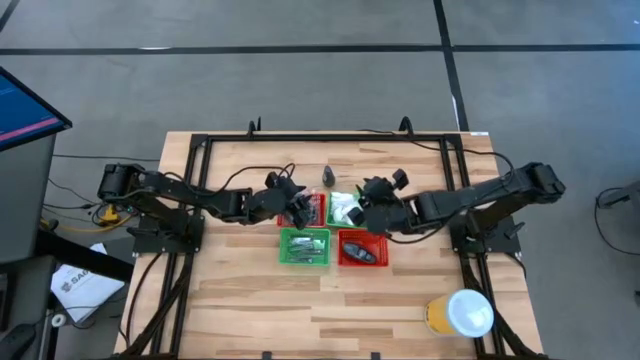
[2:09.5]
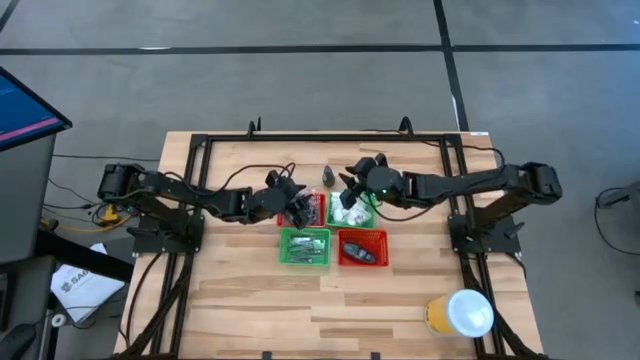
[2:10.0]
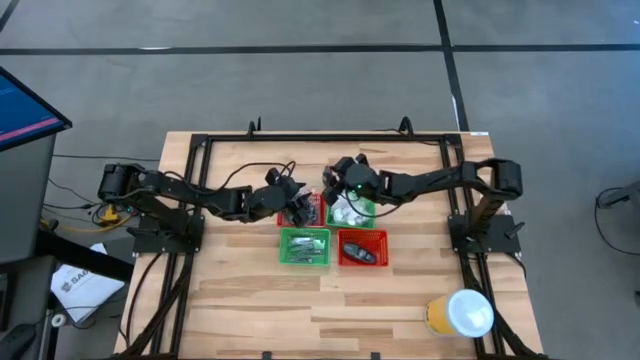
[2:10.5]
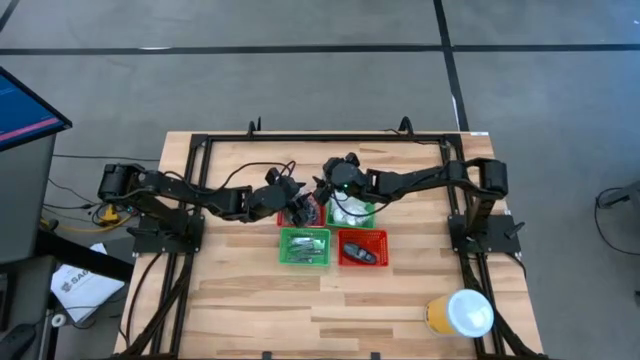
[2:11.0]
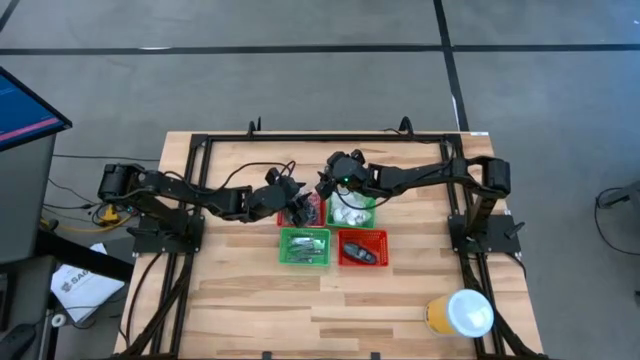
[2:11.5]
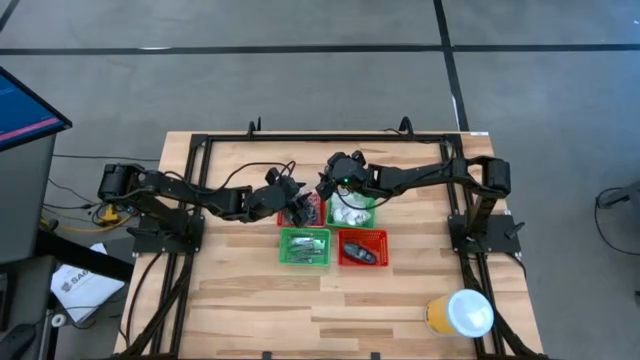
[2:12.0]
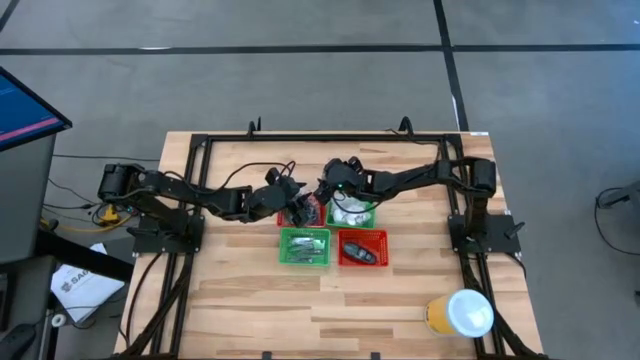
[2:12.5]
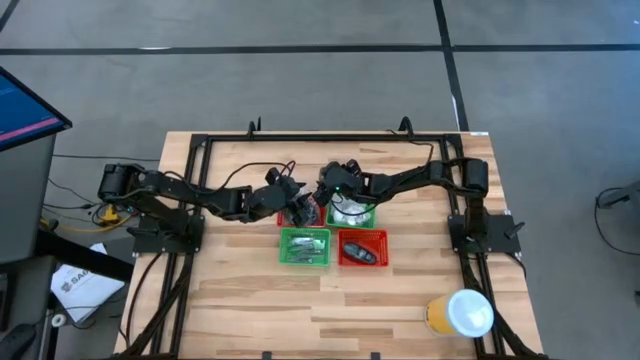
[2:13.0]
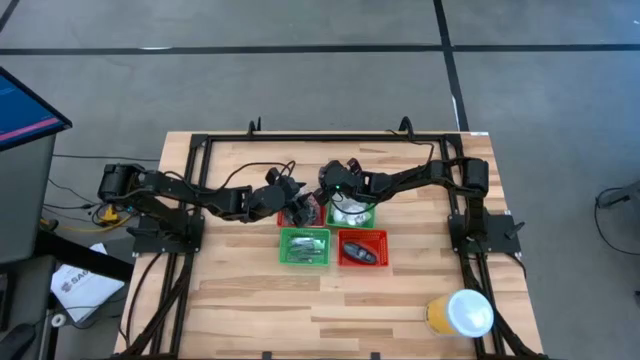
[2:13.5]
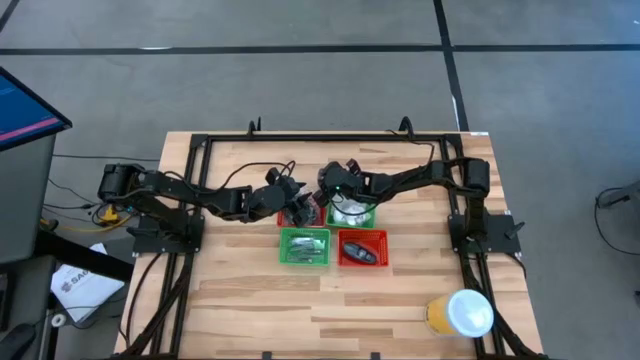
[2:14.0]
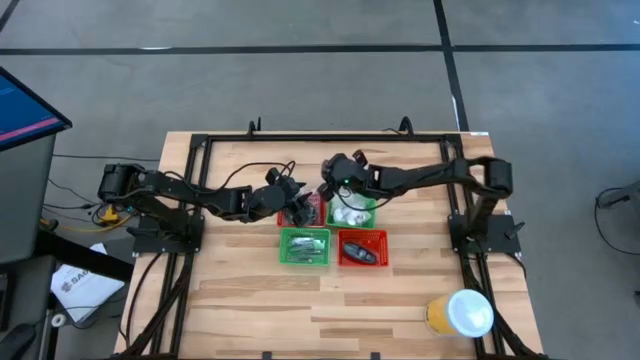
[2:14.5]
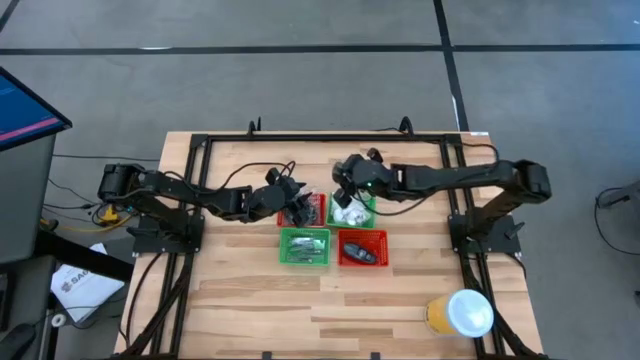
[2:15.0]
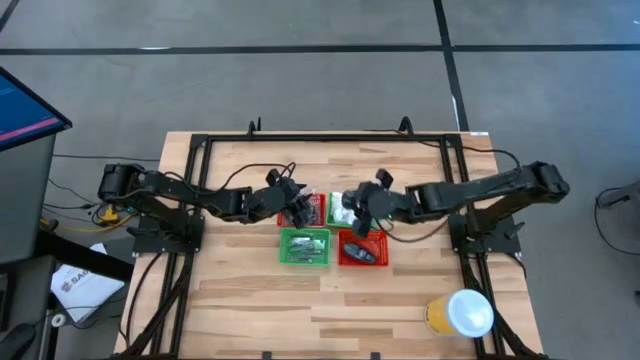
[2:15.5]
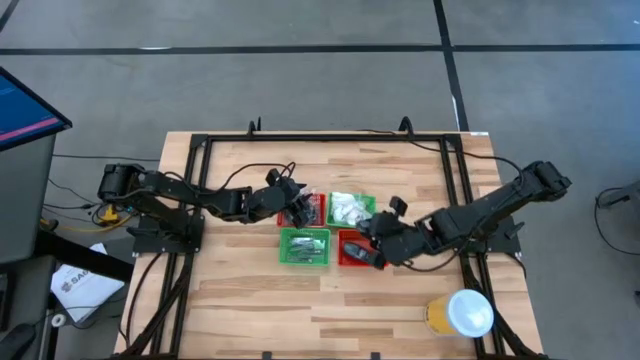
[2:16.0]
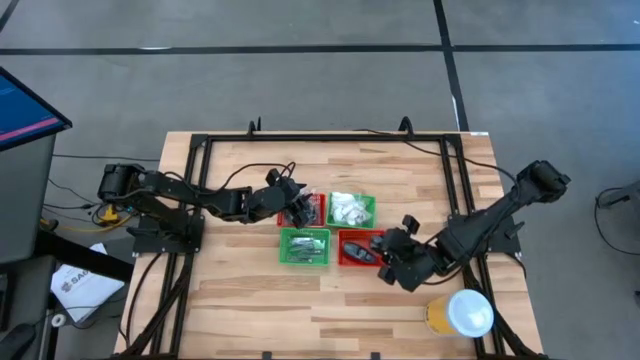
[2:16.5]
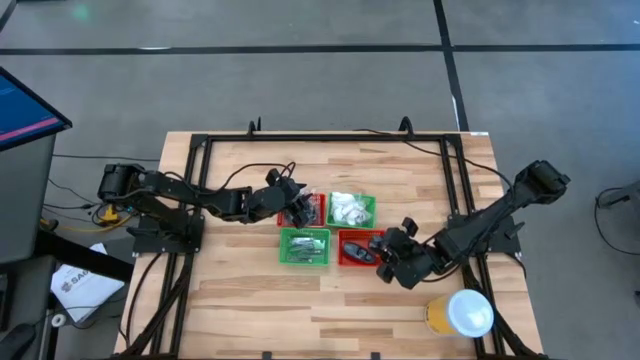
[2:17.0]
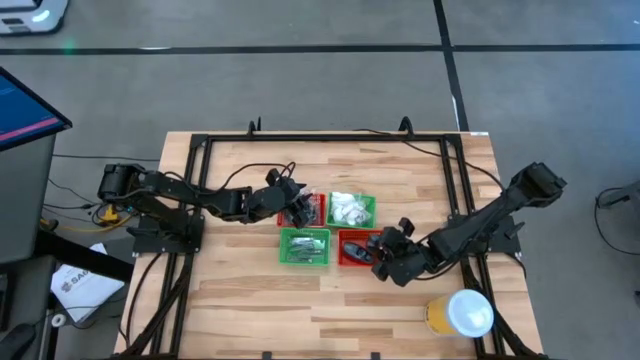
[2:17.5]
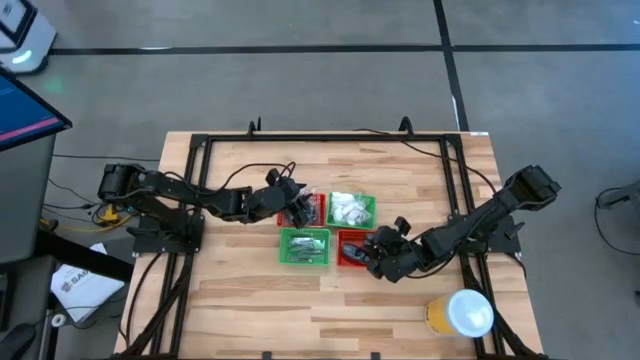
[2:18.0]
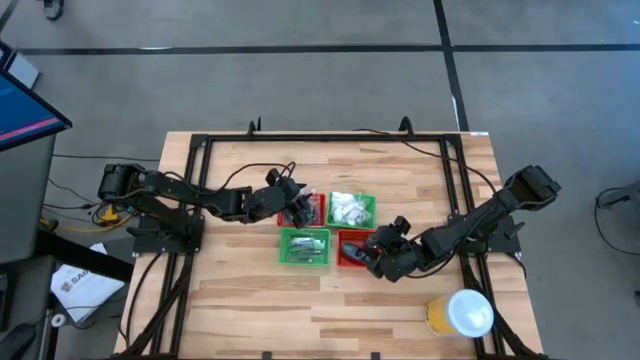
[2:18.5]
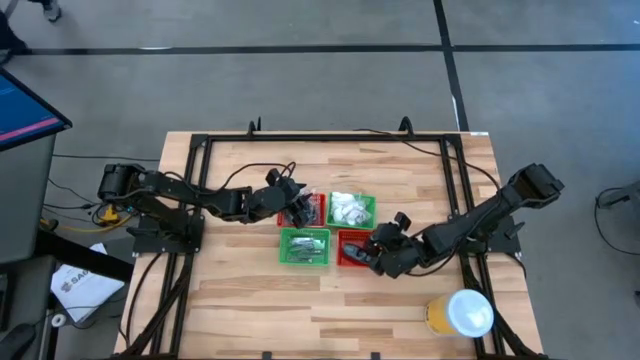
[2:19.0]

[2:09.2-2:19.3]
Task: Pick & Place Travel size toiletries
Put the black deodorant into the right red basket

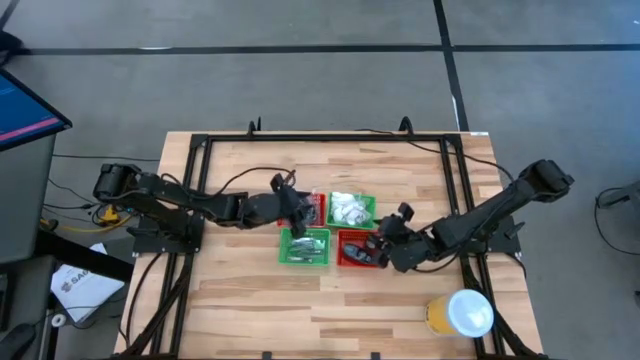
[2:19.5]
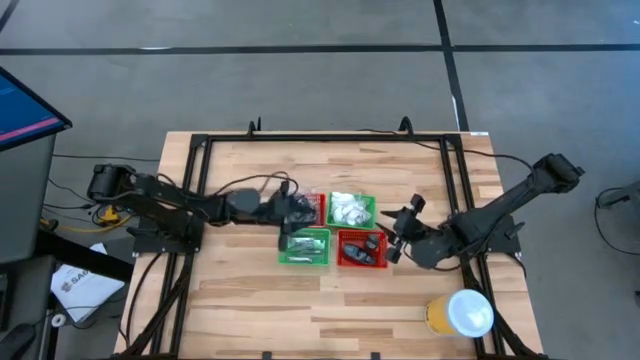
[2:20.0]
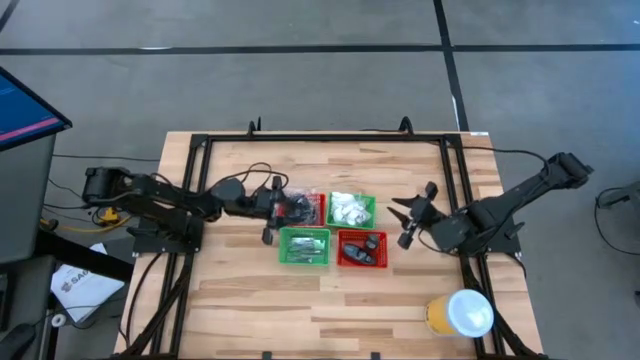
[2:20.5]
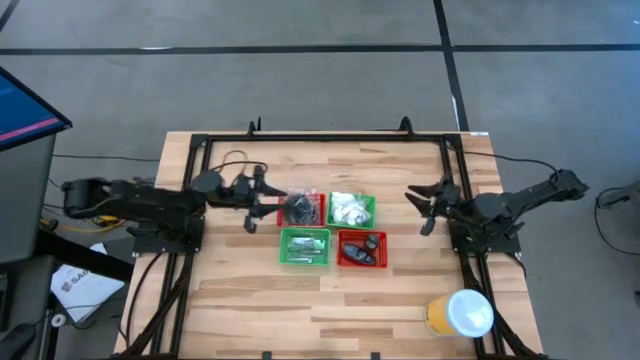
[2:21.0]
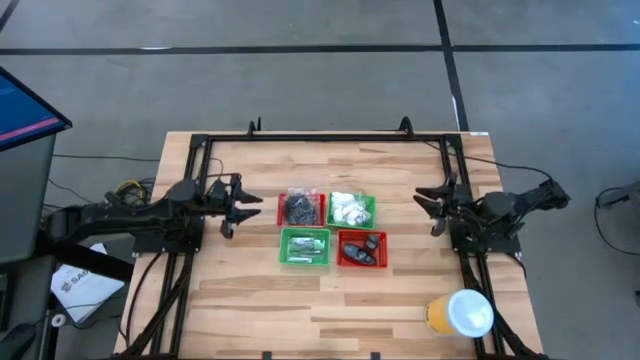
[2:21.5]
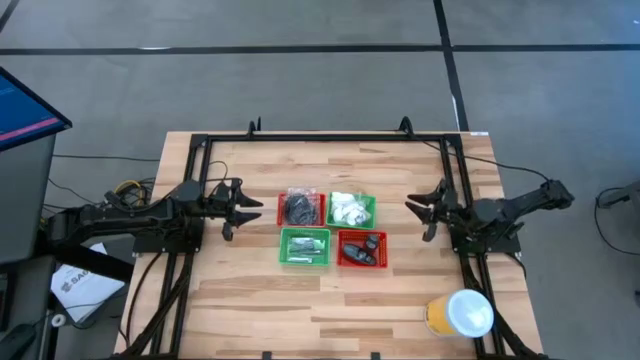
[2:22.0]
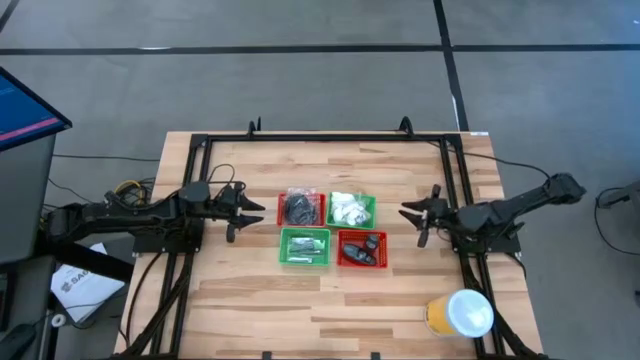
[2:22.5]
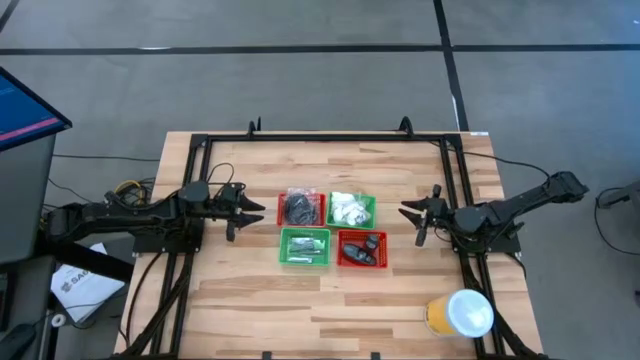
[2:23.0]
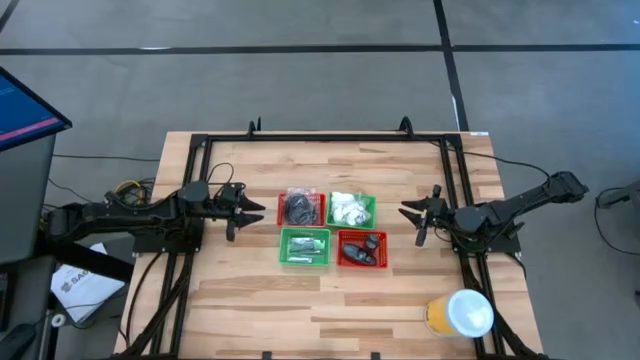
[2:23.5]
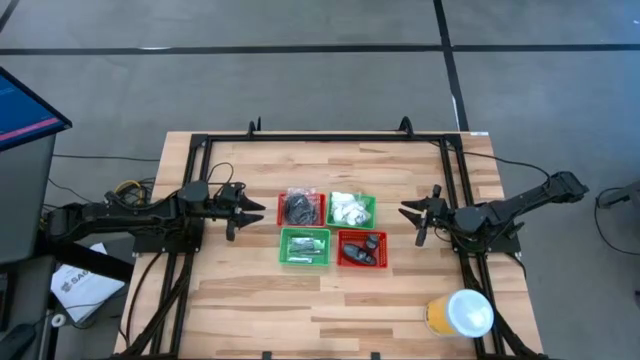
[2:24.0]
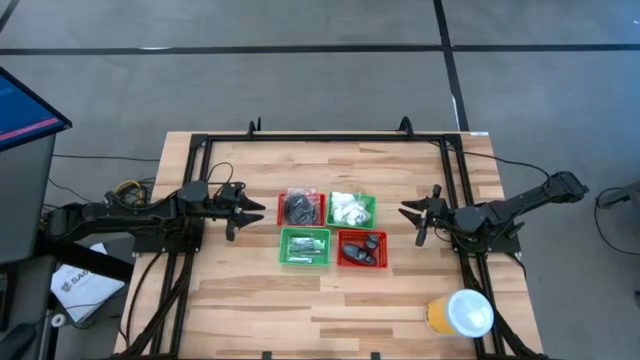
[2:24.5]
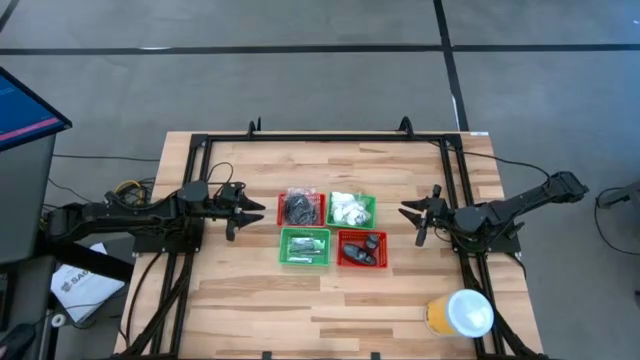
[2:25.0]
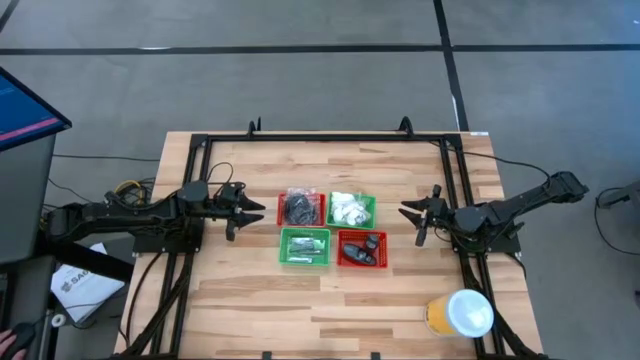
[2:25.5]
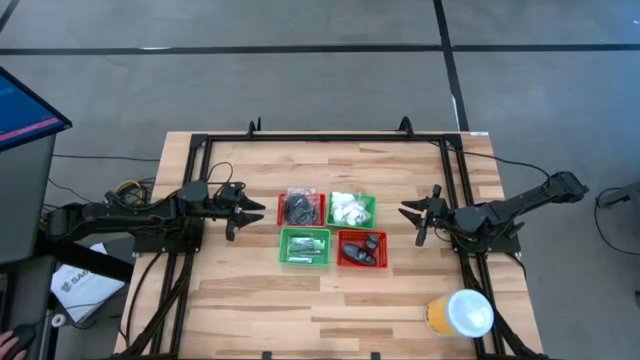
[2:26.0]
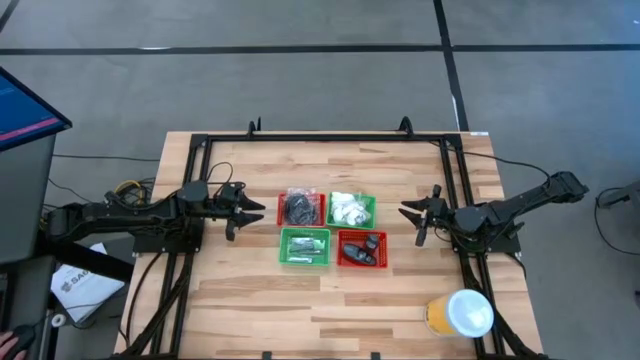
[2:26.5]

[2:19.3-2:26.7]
Return to Home Position

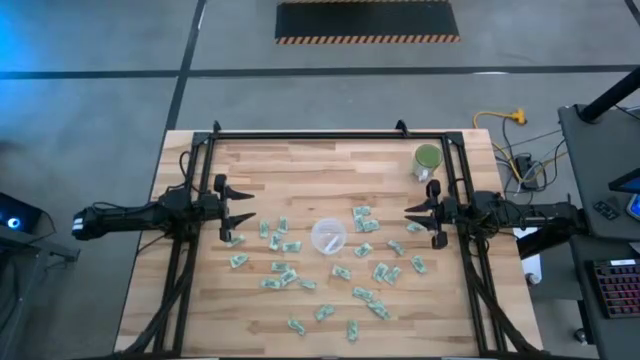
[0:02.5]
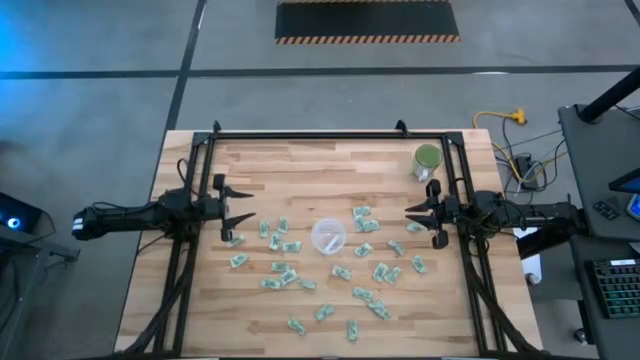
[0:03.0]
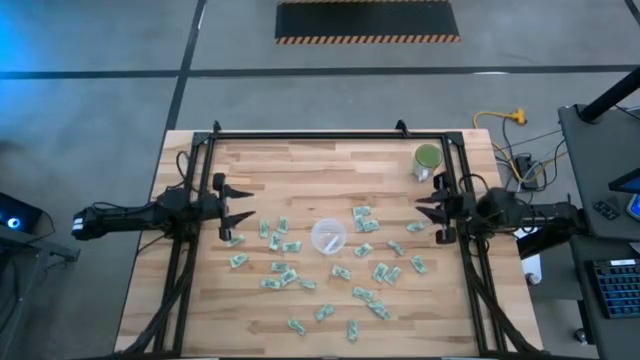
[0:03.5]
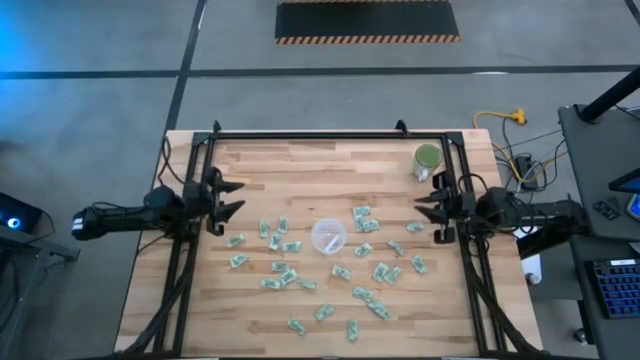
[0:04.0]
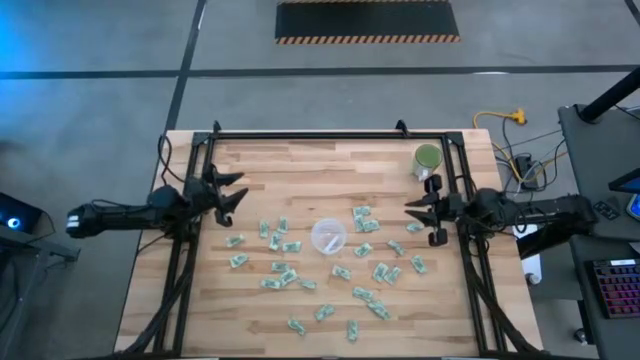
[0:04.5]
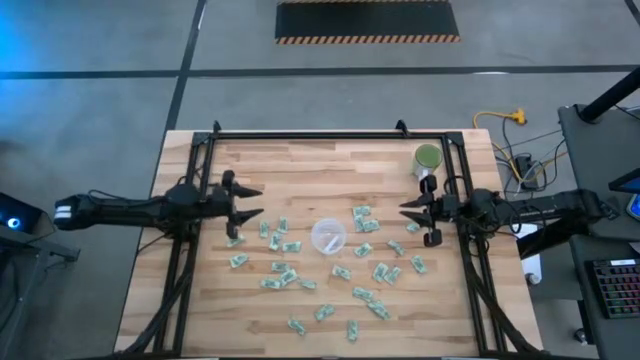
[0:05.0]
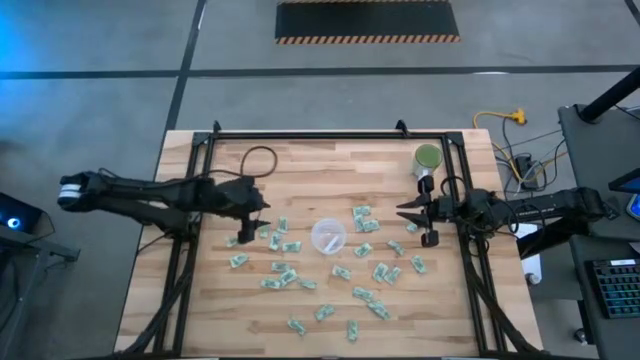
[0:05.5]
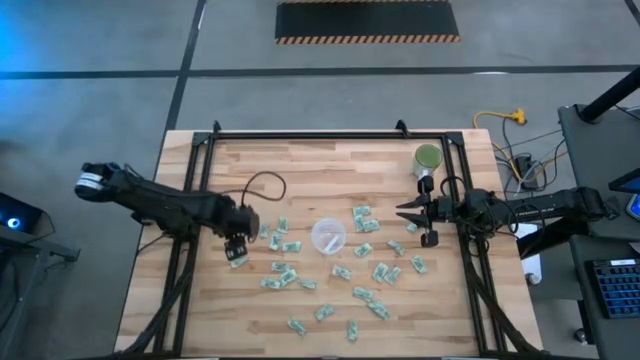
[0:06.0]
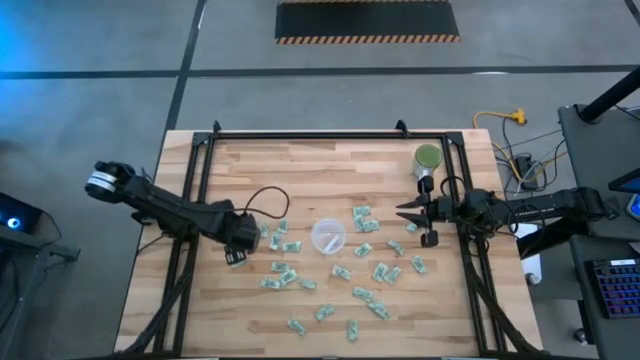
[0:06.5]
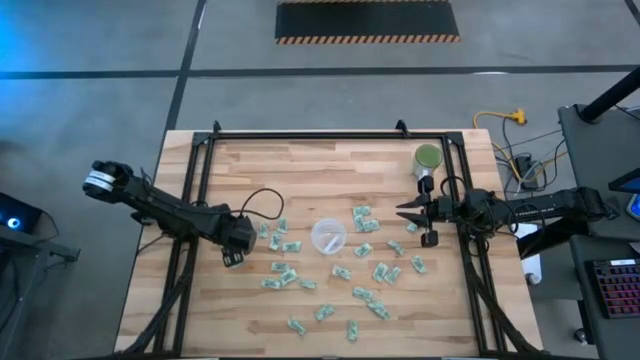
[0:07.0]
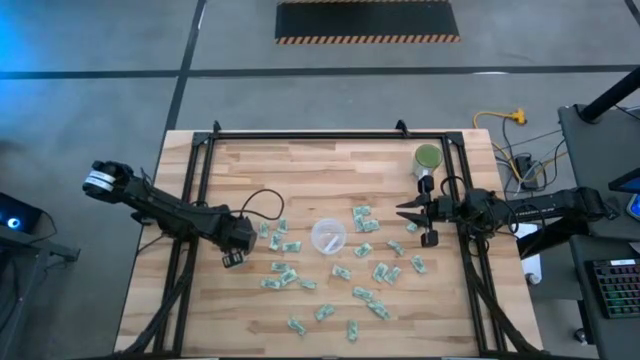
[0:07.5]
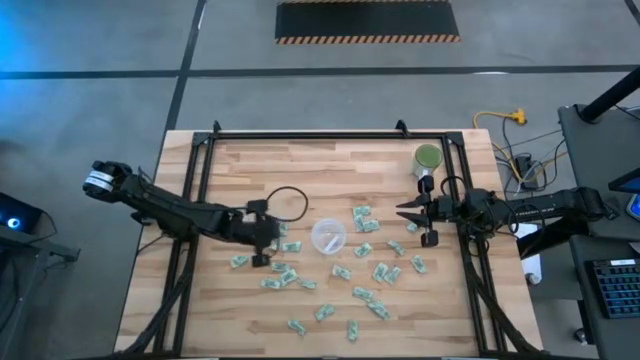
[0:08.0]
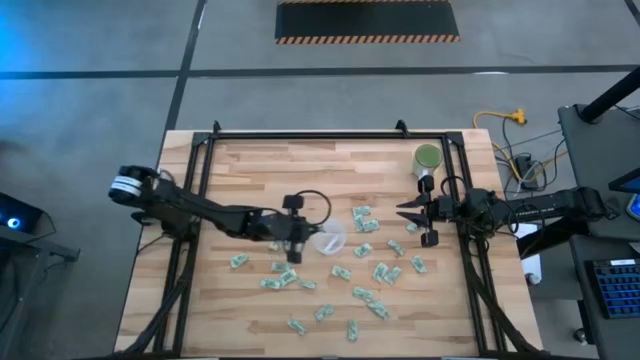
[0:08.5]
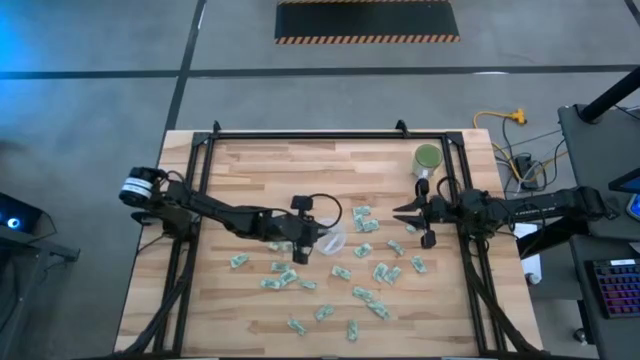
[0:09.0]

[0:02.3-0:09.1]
Task: Pick and place Stevia / Truvia into bins
Put the light green stevia packet into the transparent container
